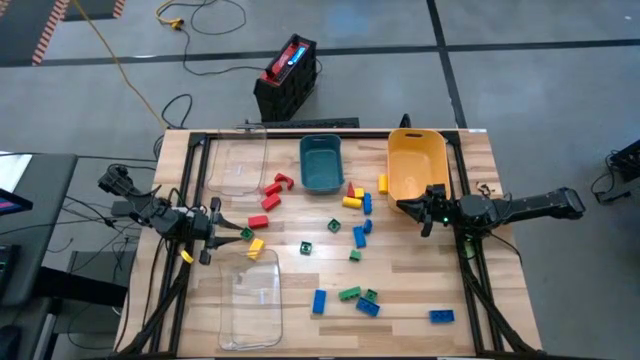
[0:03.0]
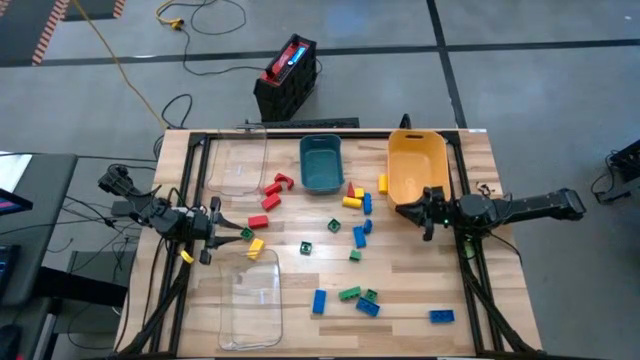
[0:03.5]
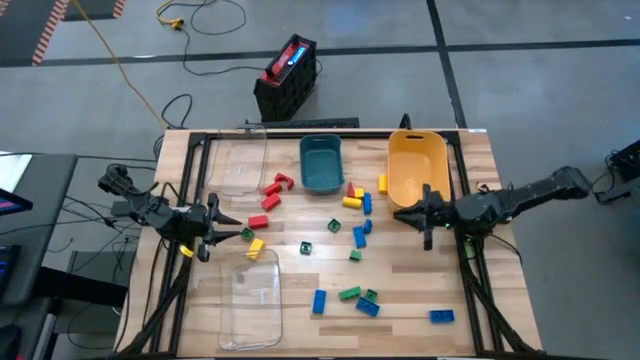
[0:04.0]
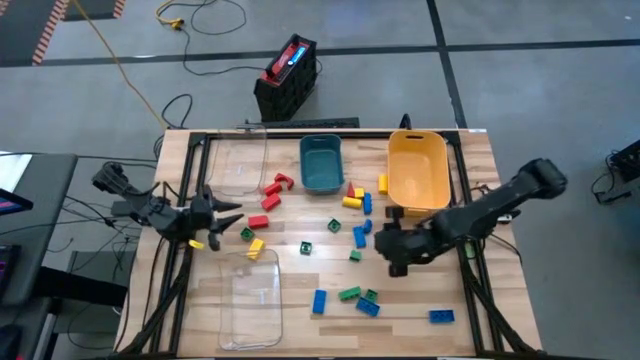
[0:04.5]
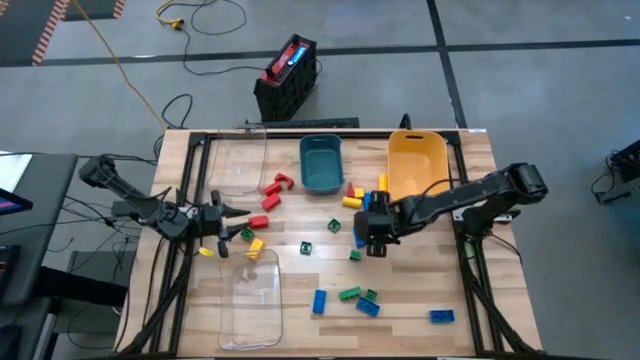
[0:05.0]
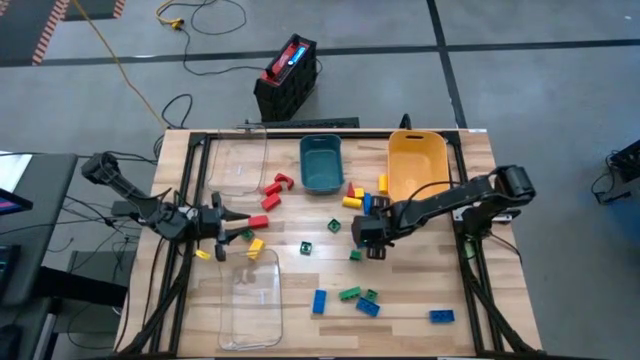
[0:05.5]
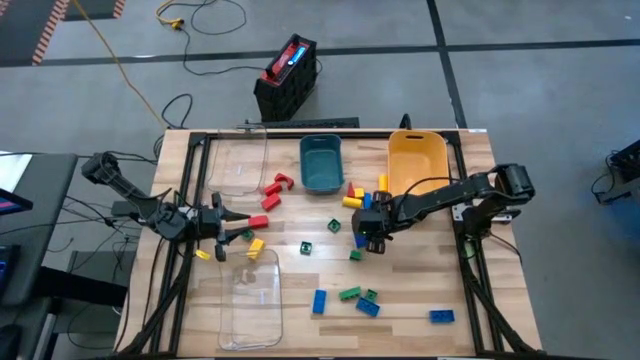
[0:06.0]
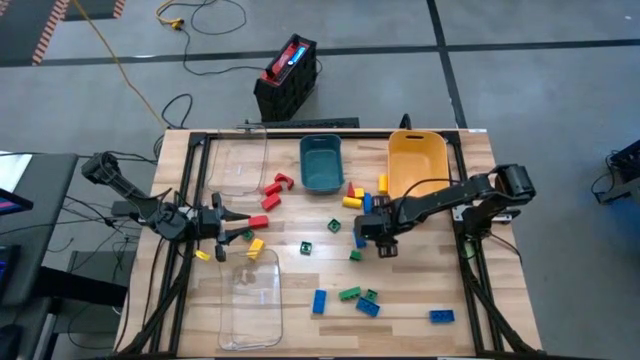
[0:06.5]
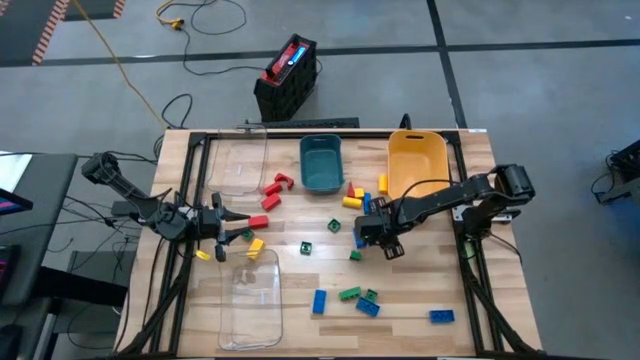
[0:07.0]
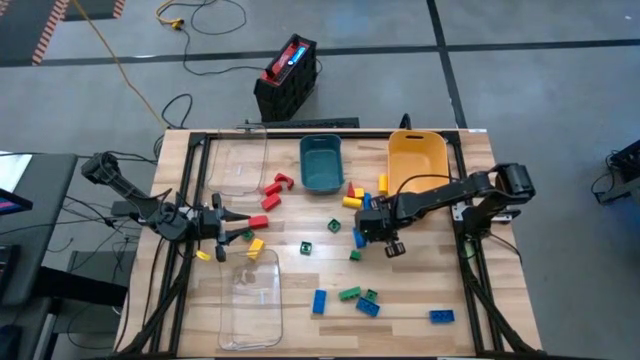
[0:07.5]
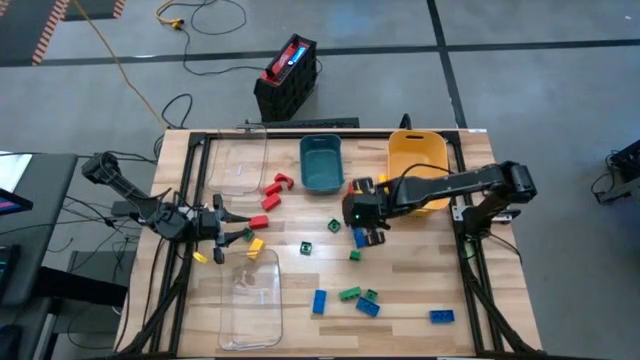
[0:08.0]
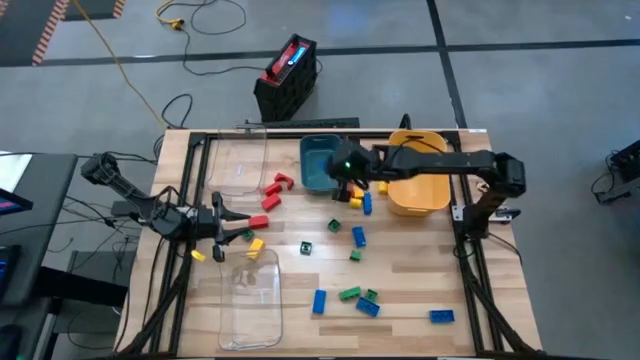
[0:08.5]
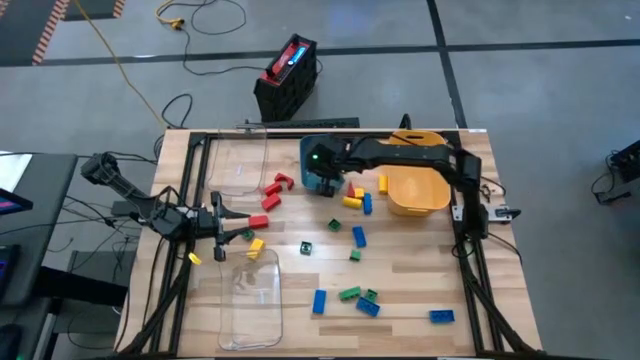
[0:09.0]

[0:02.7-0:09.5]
Task: Sort blocks
Put the blue game piece into the blue bin

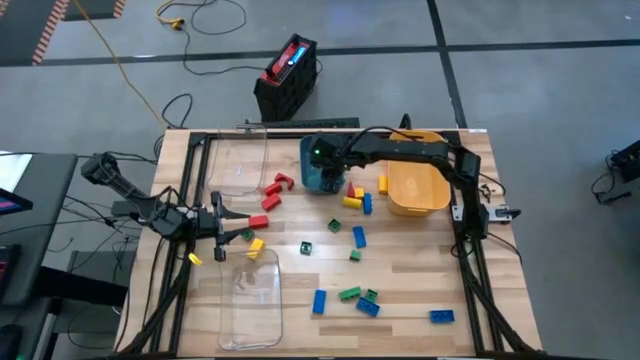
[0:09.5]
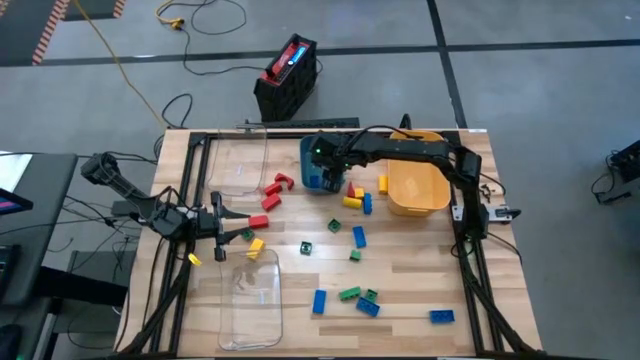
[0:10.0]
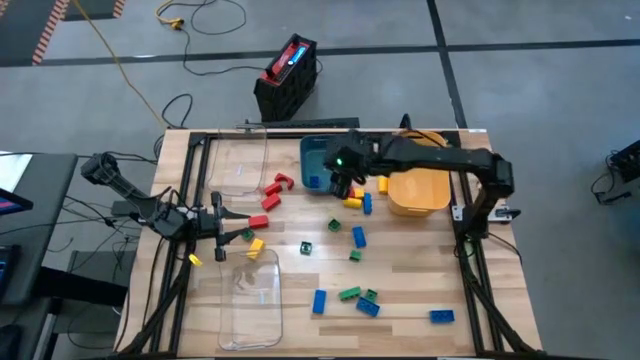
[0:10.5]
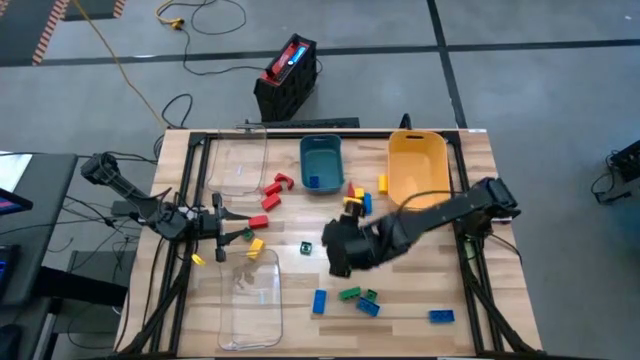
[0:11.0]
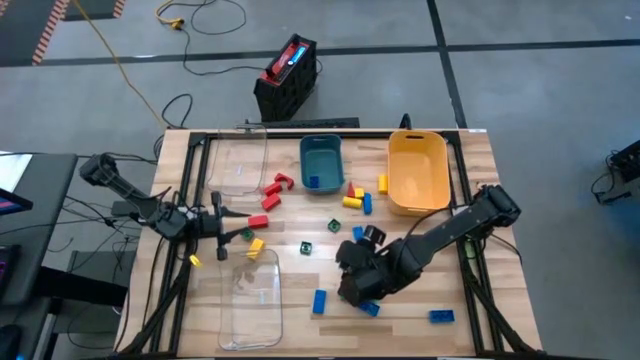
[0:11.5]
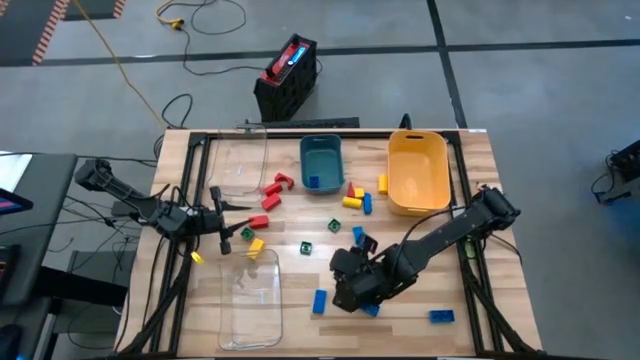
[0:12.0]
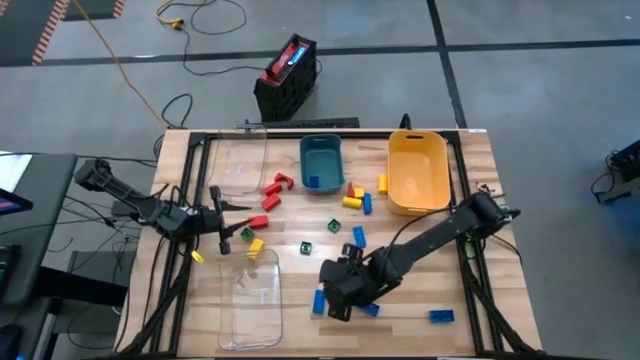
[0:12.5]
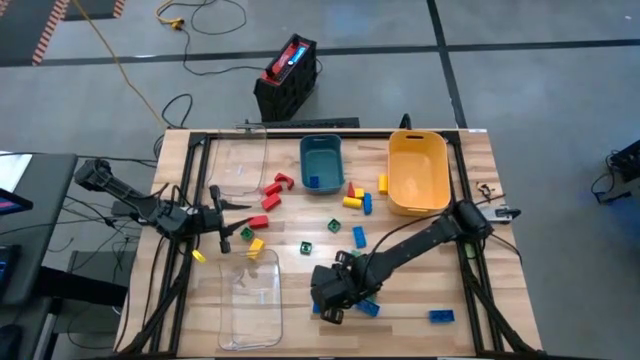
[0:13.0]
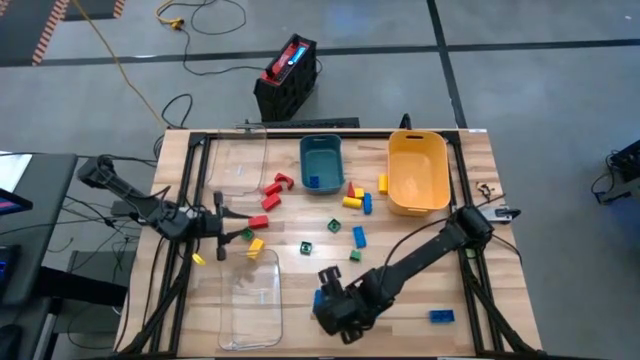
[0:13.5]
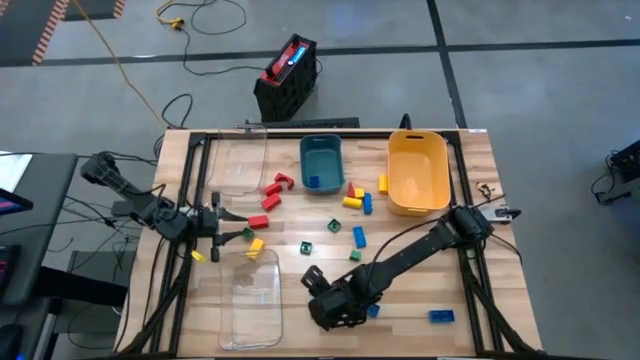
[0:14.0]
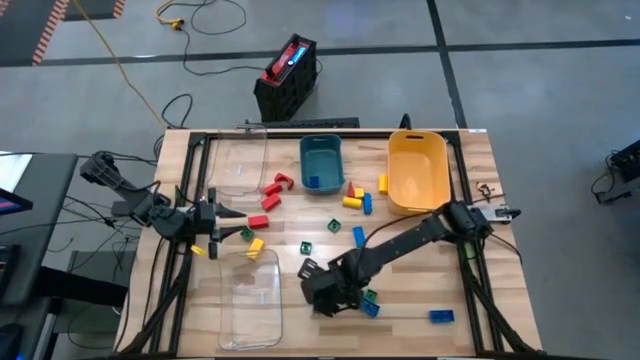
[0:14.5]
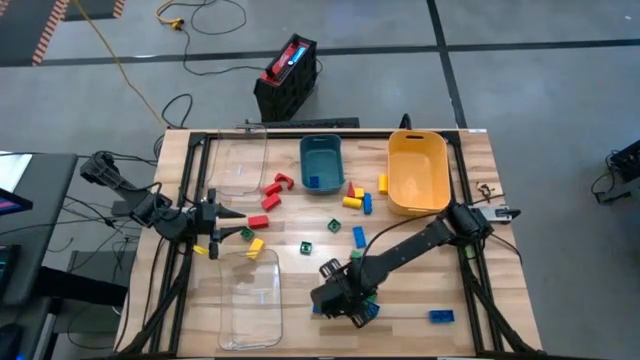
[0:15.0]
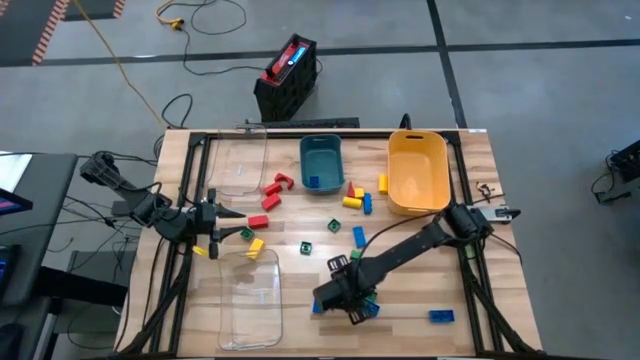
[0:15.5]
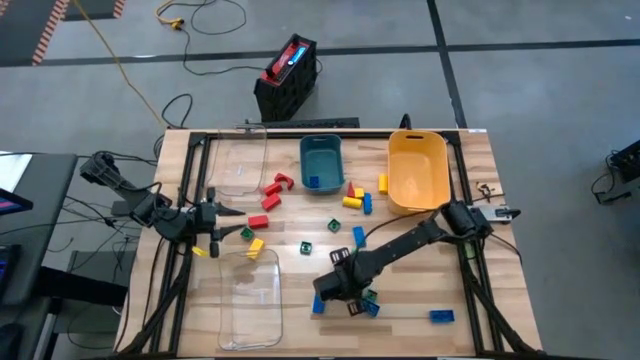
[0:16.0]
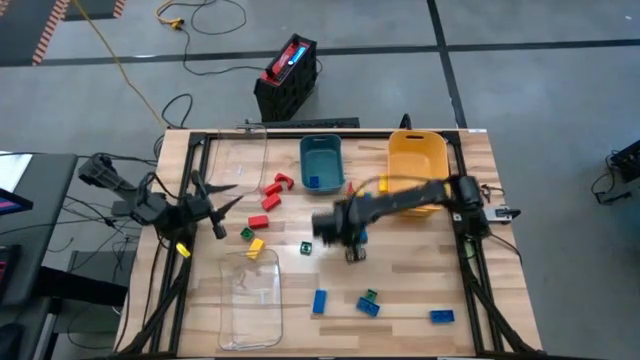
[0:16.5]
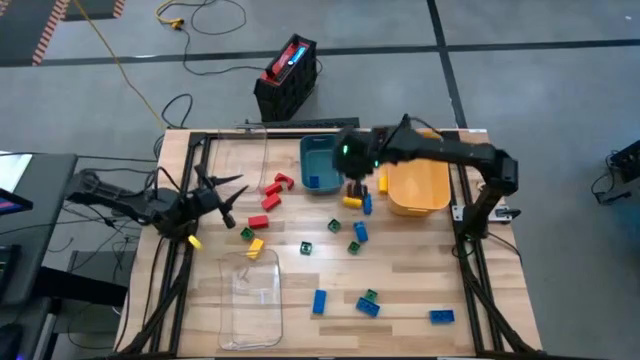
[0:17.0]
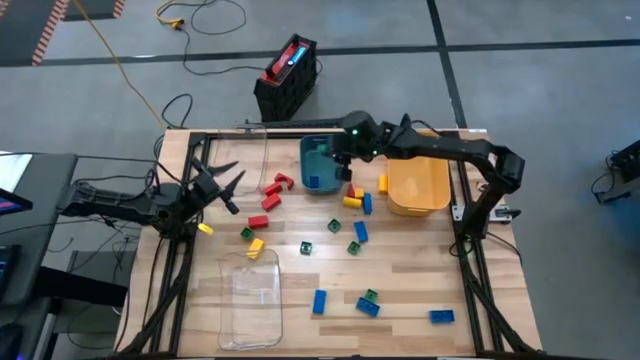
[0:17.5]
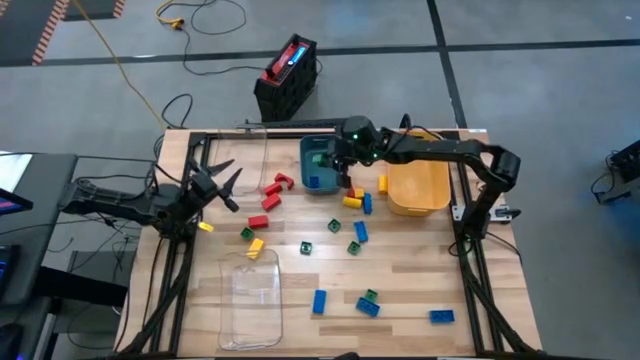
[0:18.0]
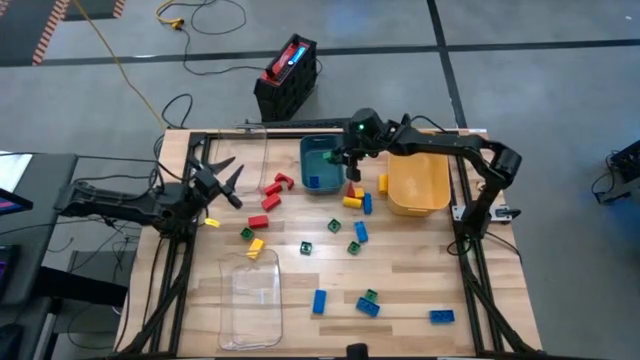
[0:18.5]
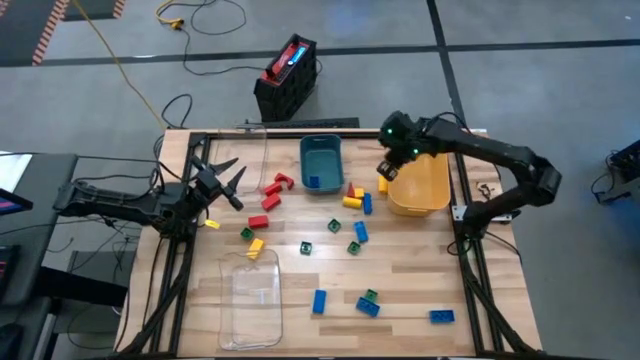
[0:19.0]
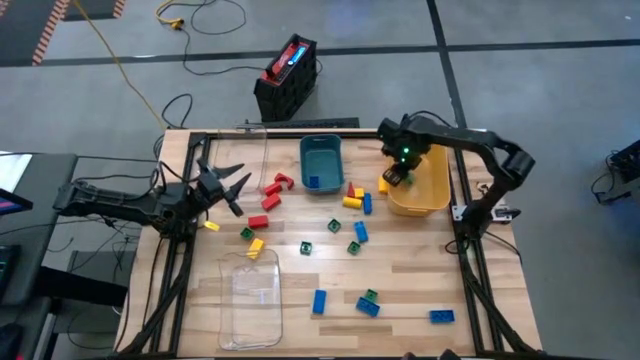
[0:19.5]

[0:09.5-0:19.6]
Put the green game piece into the yellow bin

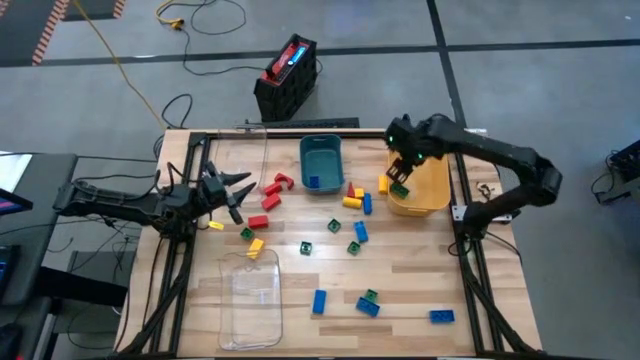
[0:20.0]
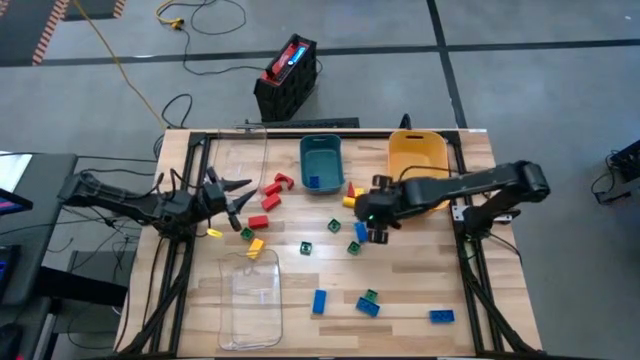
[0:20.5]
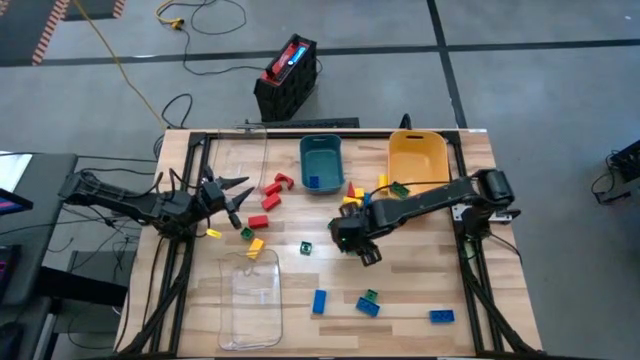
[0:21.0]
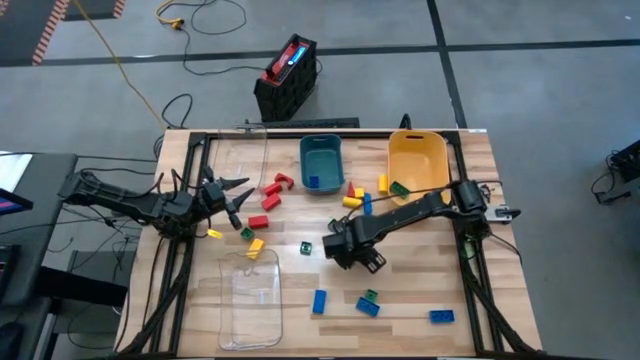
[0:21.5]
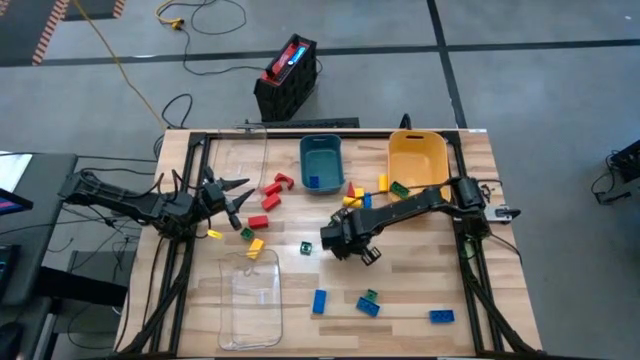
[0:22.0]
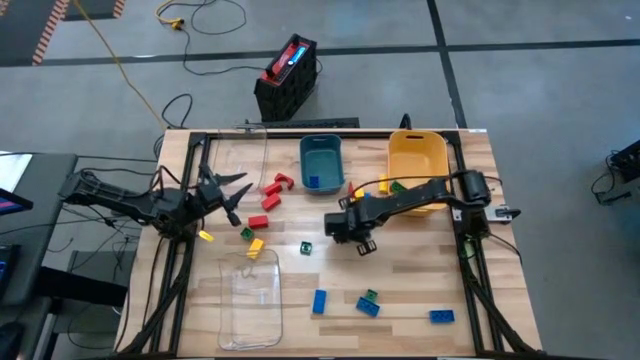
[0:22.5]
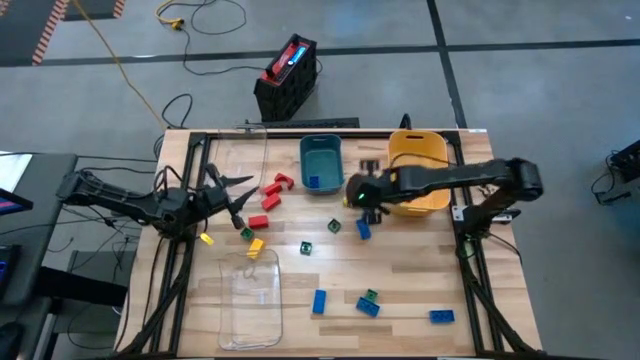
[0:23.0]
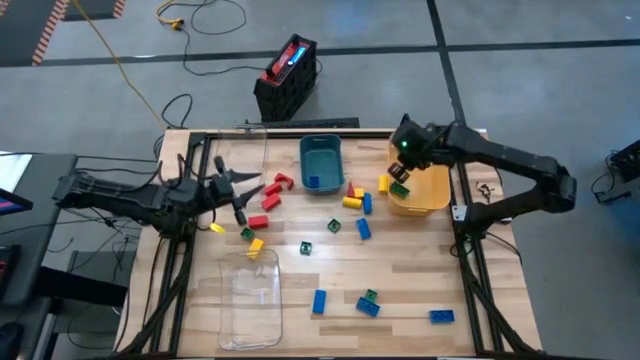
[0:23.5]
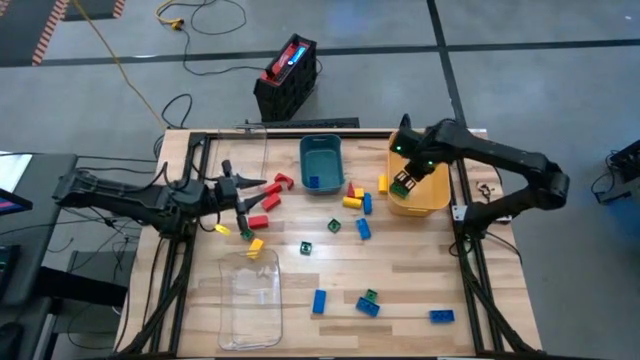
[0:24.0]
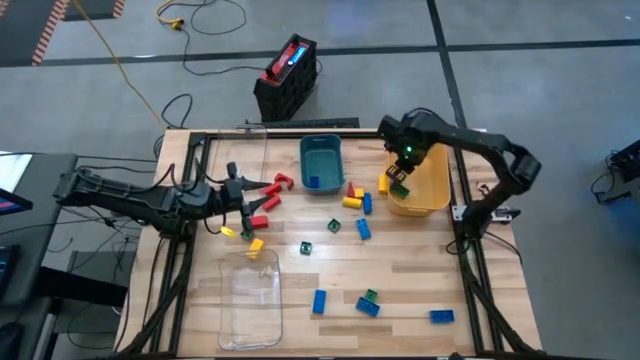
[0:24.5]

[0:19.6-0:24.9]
Put the green game piece into the yellow bin
